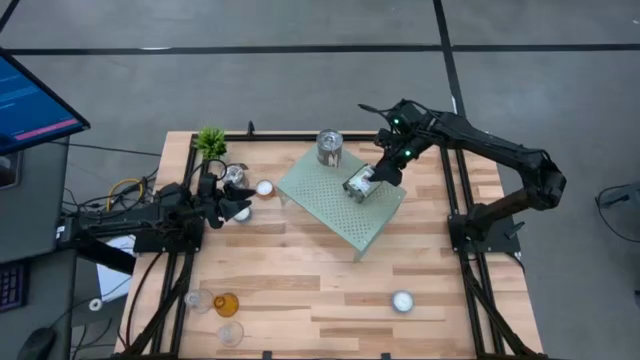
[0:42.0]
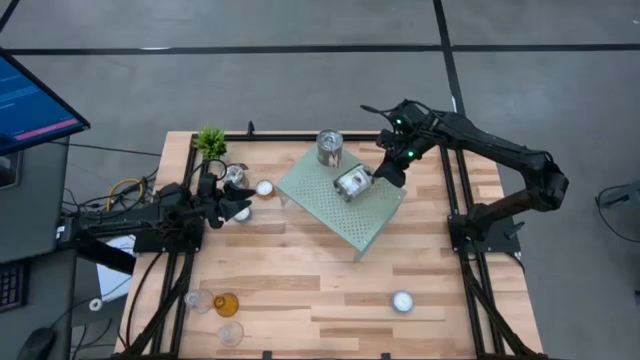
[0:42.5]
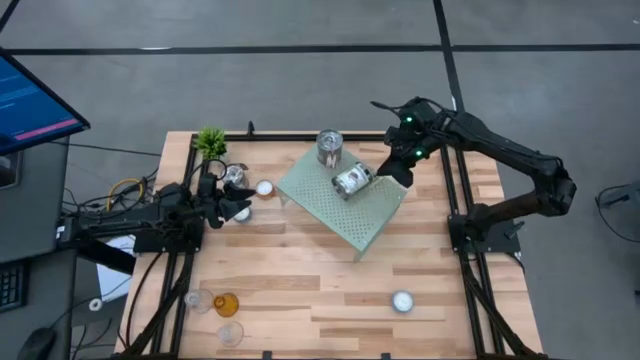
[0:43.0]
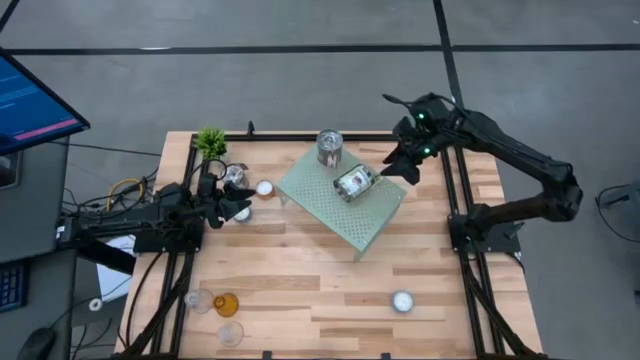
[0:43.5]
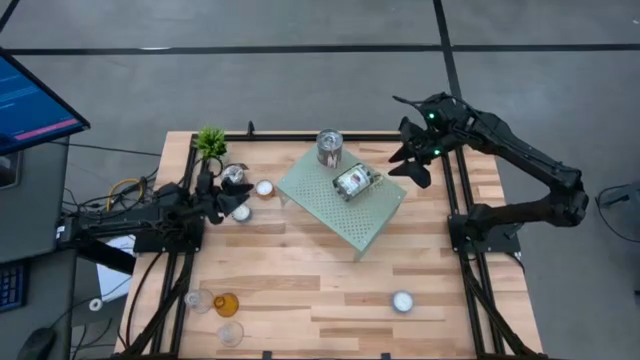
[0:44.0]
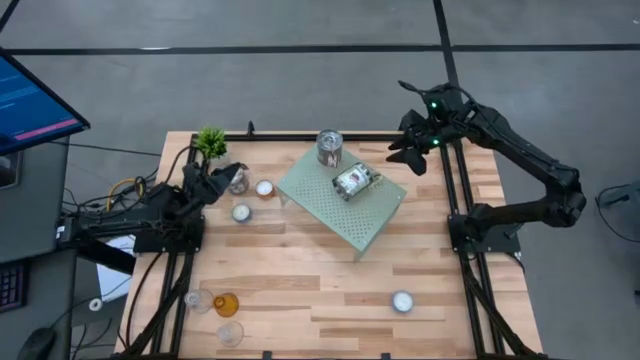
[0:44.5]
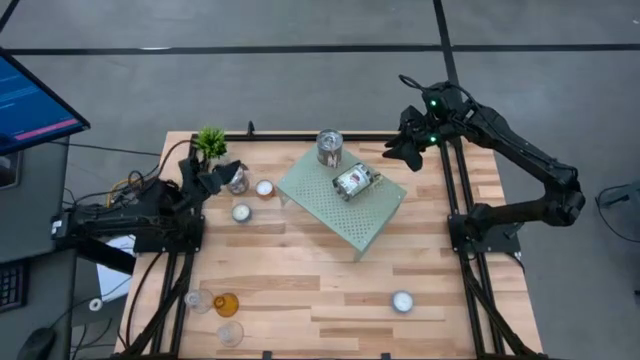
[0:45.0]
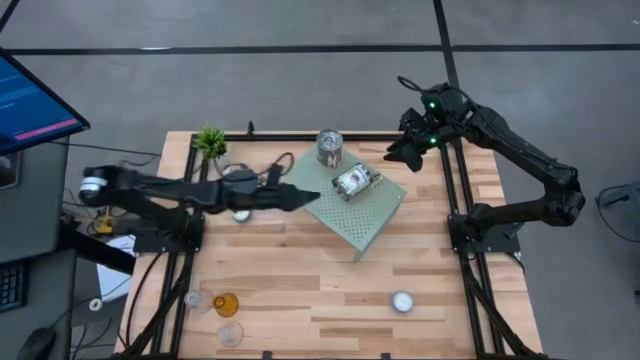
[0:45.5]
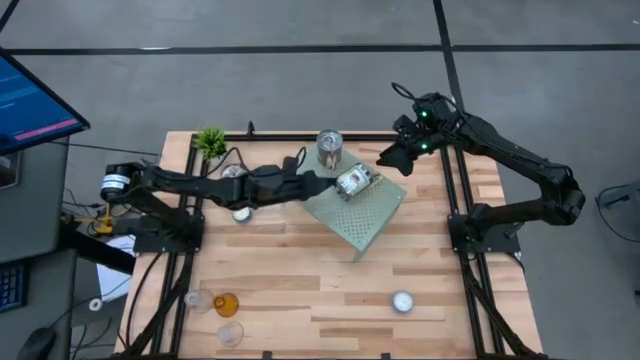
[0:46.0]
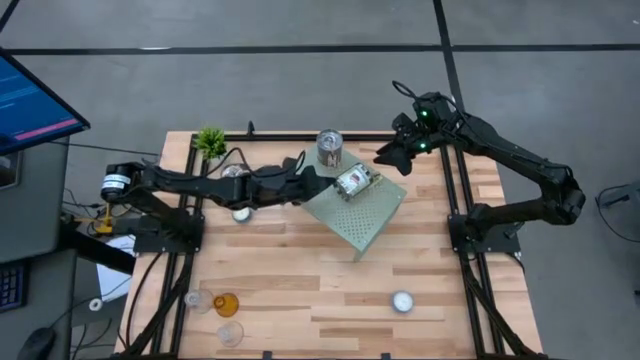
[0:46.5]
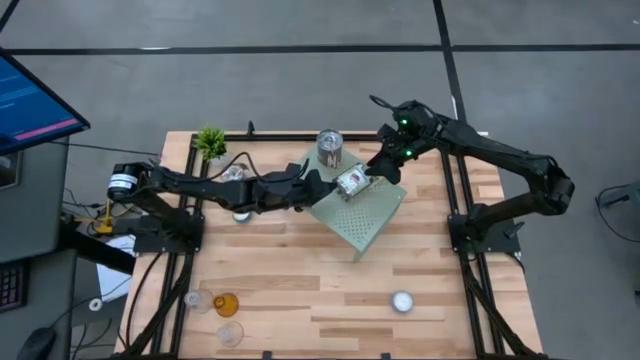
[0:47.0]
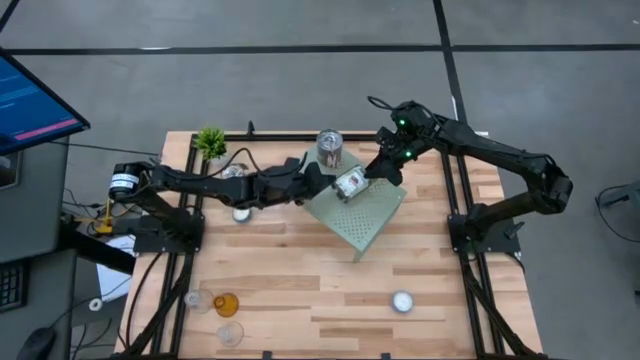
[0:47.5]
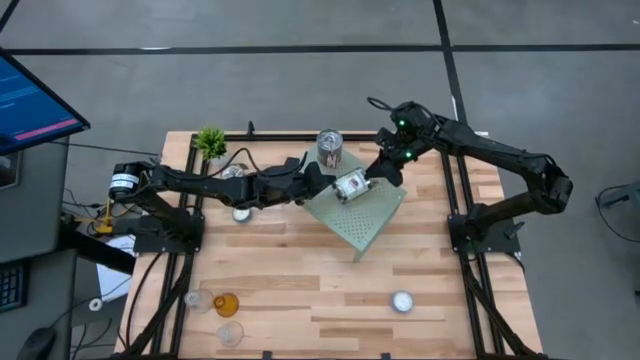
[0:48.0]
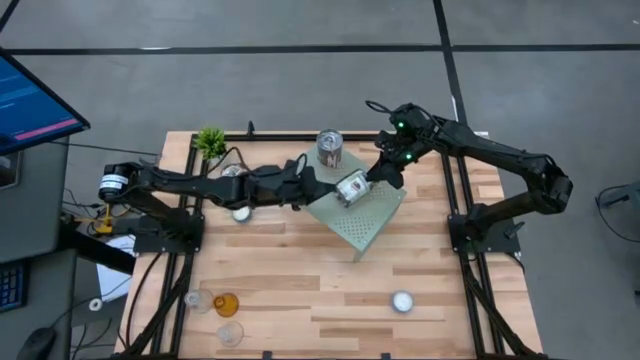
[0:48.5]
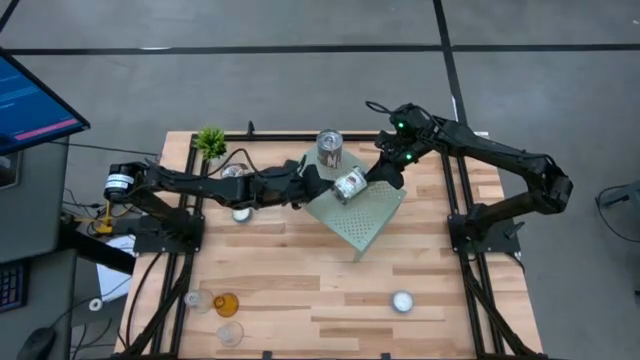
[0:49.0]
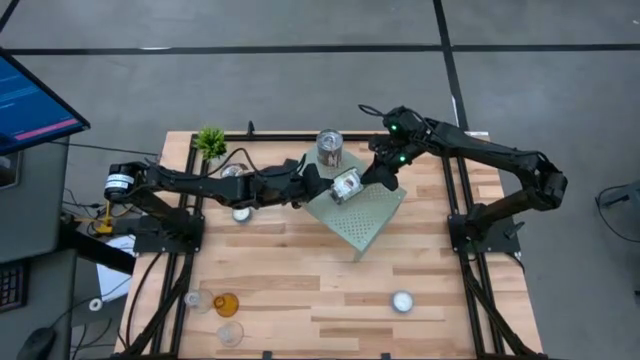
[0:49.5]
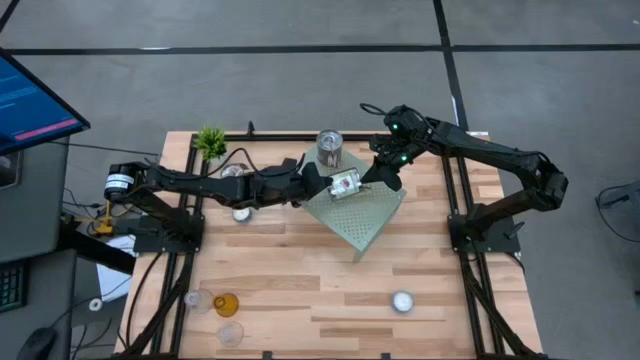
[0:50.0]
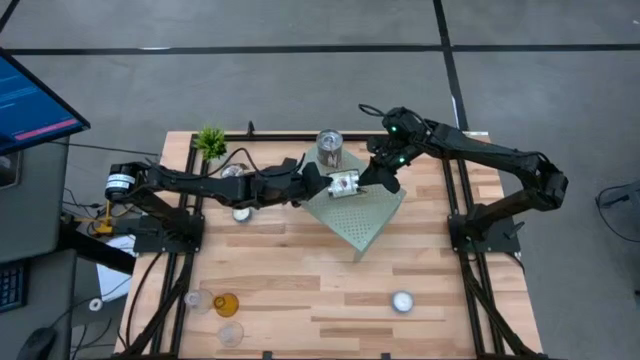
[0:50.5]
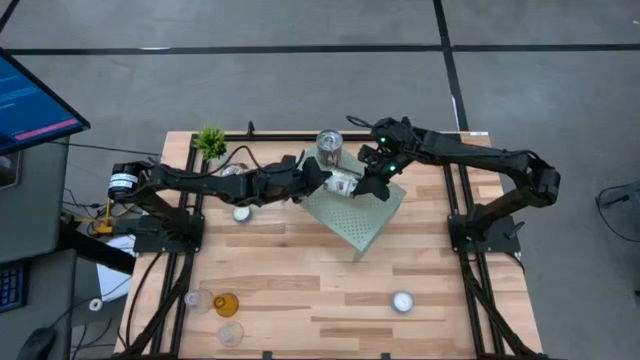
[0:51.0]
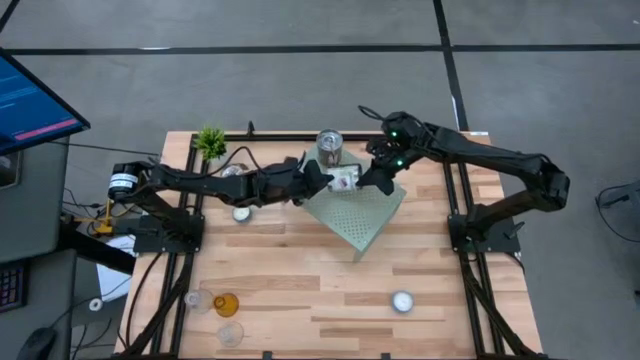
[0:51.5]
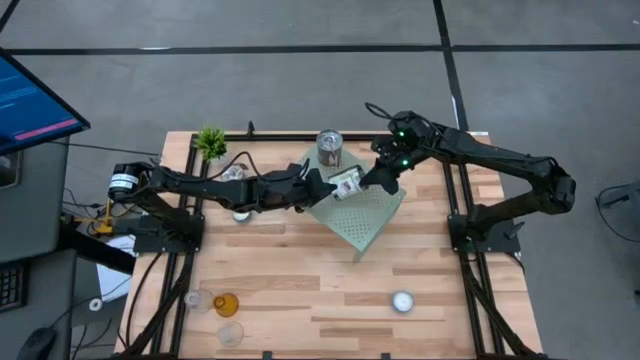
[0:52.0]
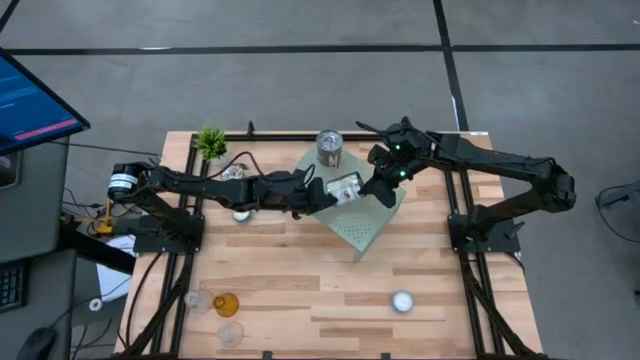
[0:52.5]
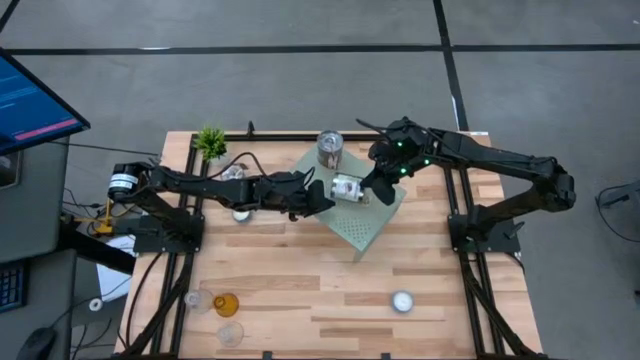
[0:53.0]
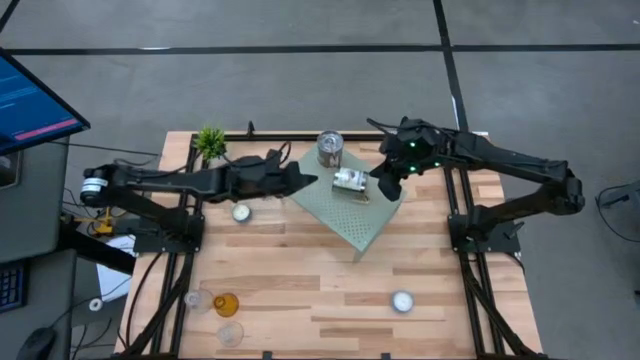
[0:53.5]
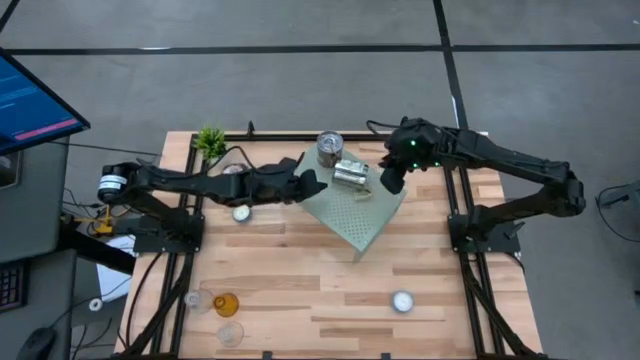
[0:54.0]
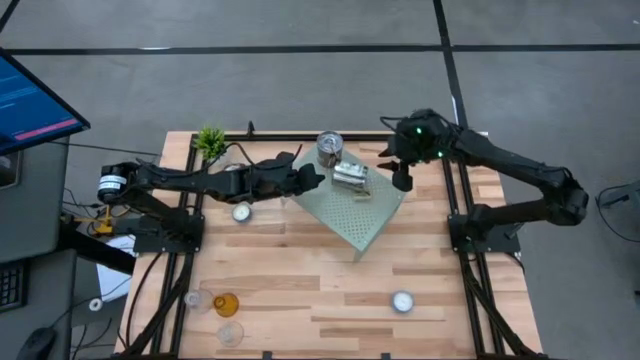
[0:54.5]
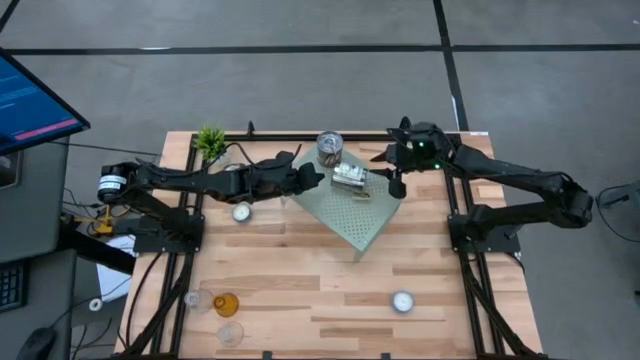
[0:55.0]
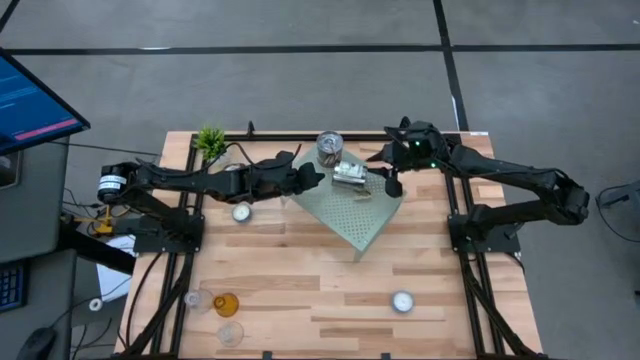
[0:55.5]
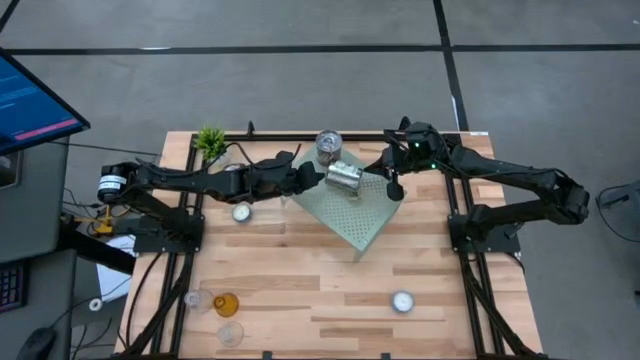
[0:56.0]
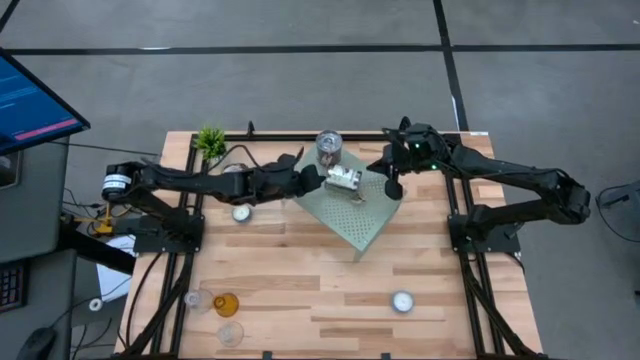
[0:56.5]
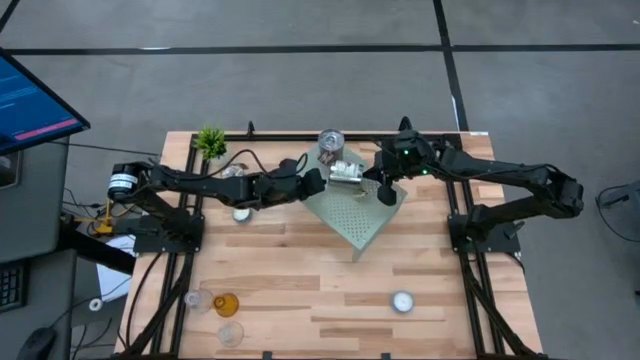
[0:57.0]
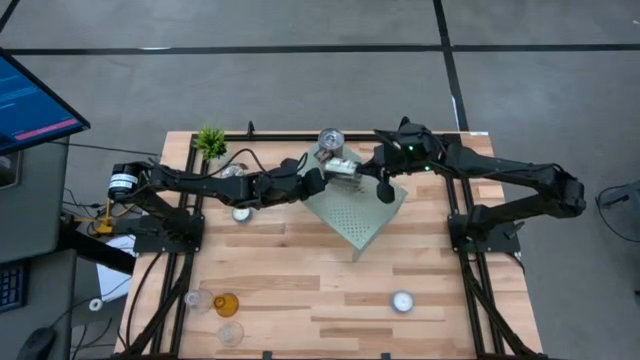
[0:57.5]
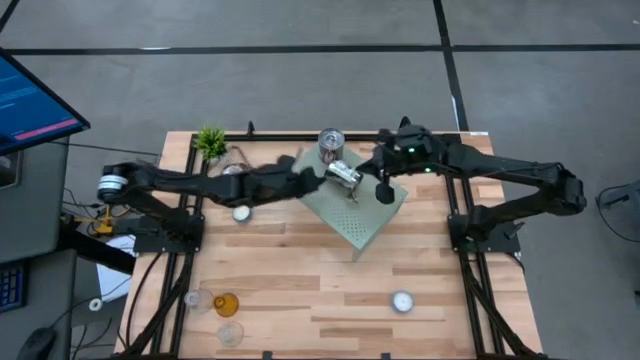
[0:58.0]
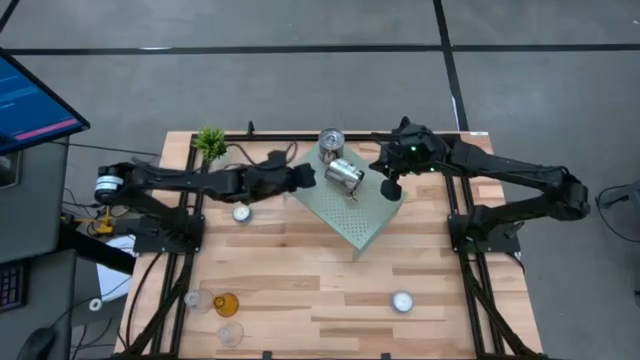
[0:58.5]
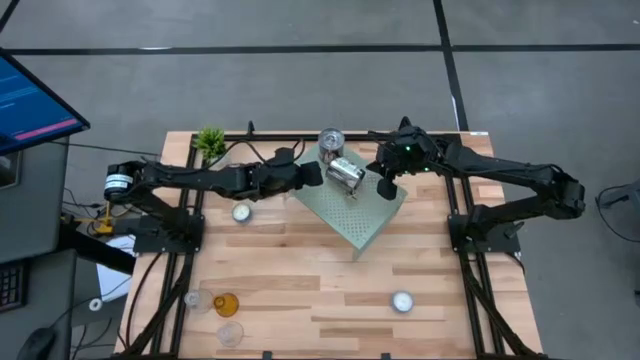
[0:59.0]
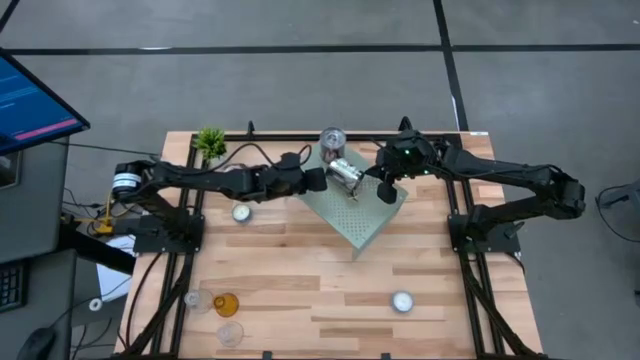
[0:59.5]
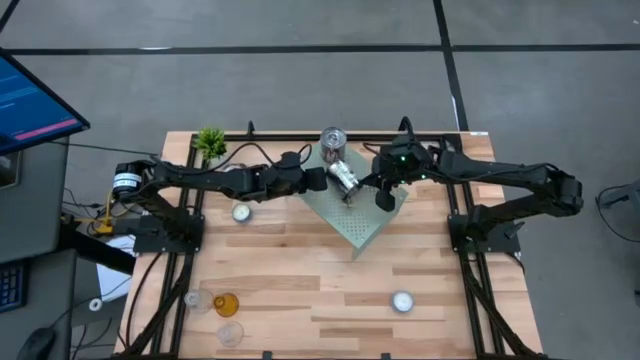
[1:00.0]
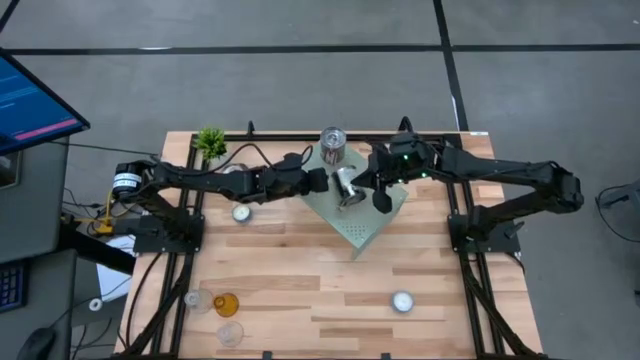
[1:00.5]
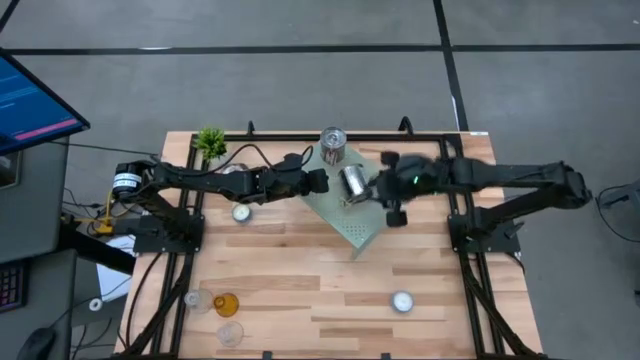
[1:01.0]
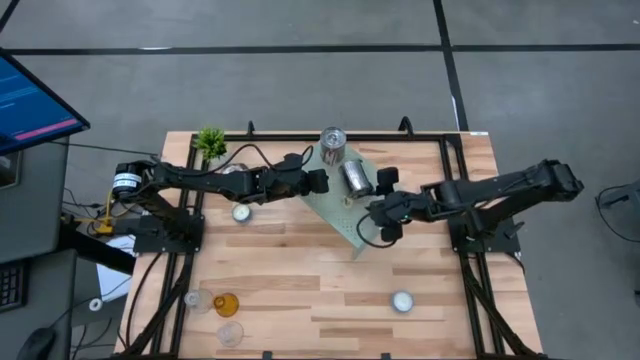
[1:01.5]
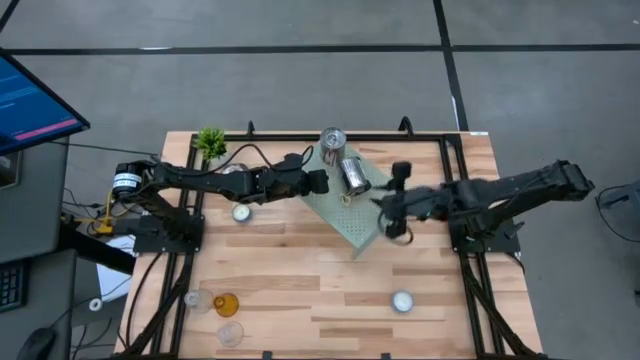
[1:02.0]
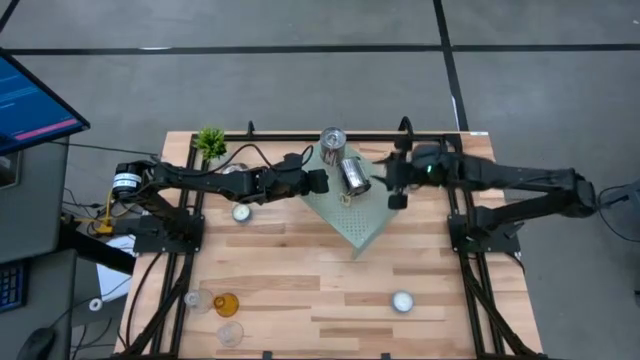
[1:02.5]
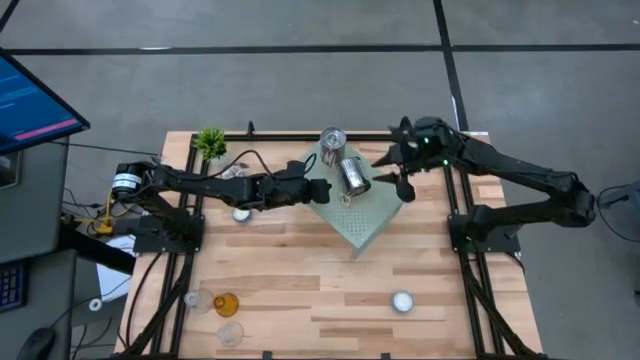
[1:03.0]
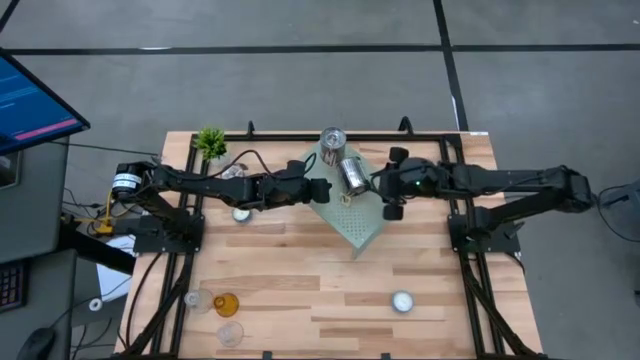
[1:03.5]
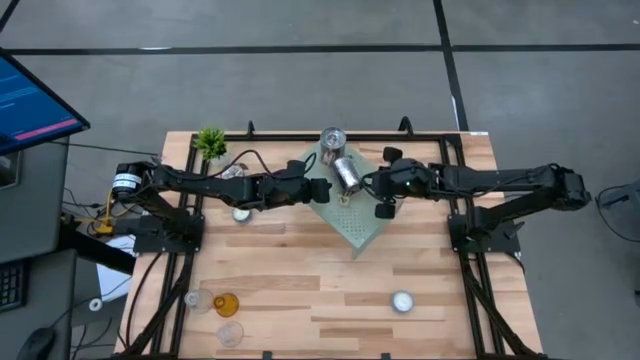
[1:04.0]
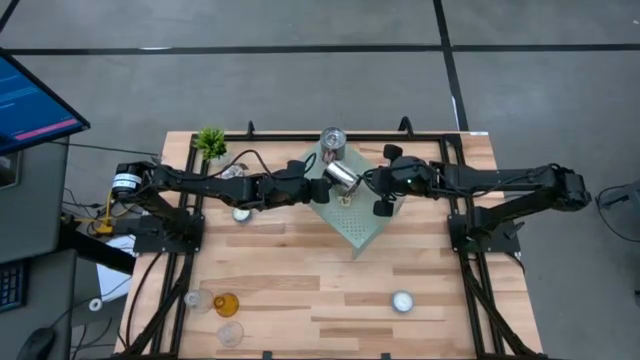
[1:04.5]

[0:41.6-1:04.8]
Task: Stock candles on shelf
Put the bottom silver scented candle on the shelf
